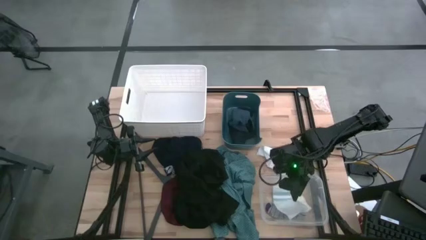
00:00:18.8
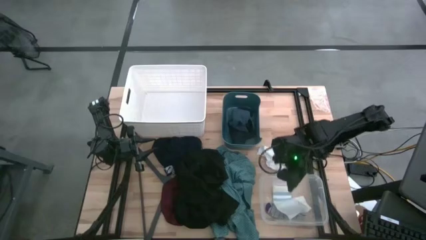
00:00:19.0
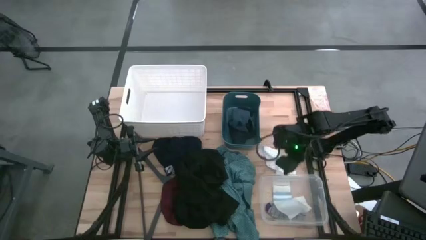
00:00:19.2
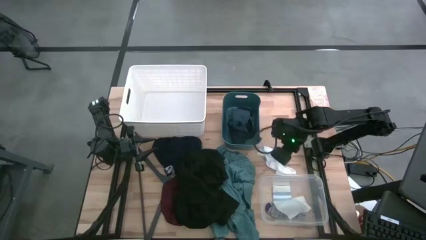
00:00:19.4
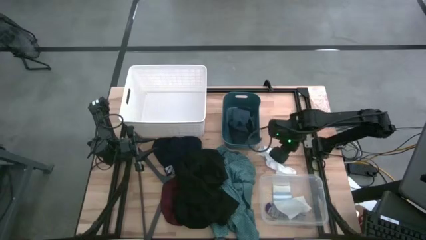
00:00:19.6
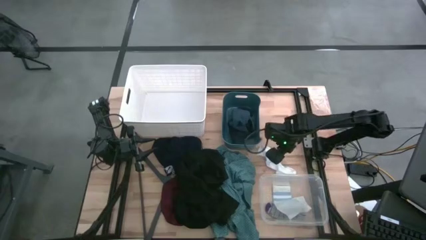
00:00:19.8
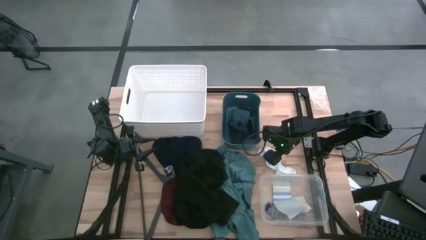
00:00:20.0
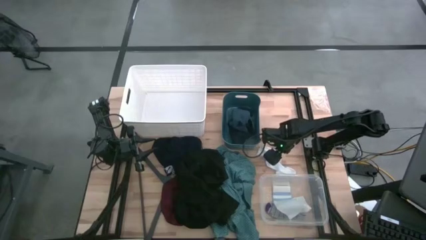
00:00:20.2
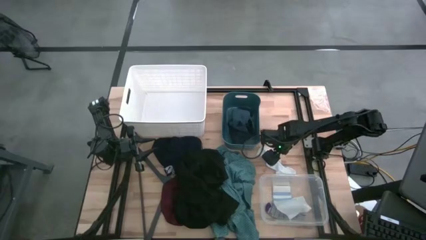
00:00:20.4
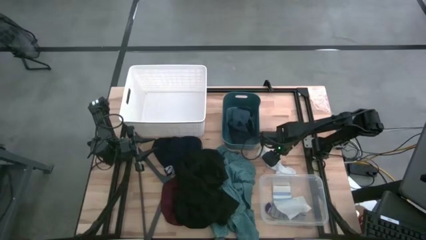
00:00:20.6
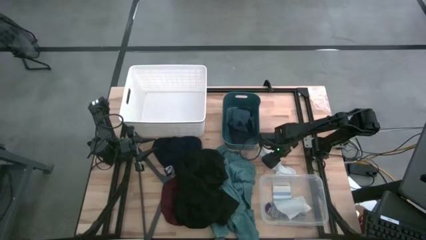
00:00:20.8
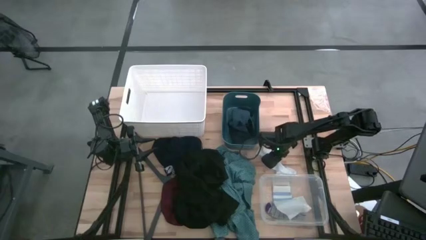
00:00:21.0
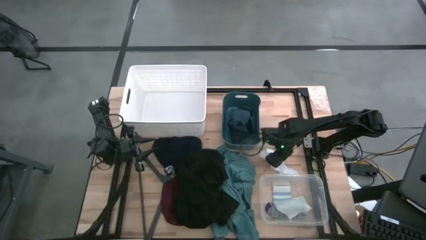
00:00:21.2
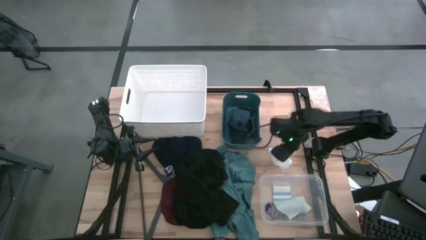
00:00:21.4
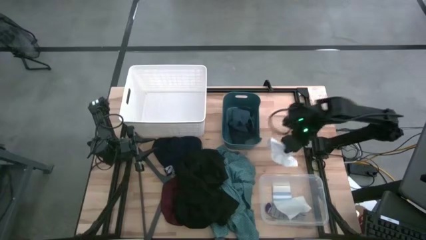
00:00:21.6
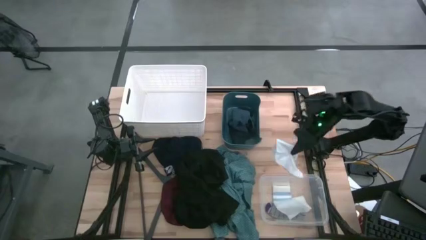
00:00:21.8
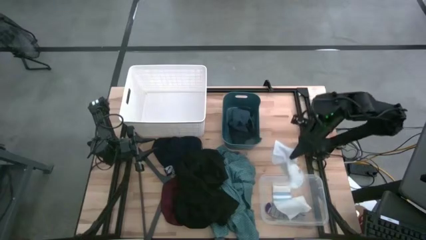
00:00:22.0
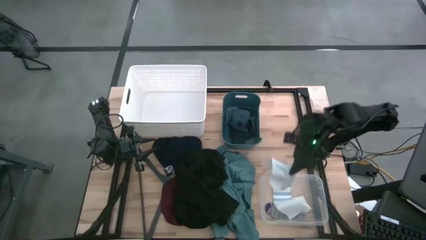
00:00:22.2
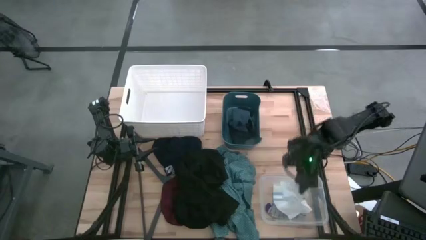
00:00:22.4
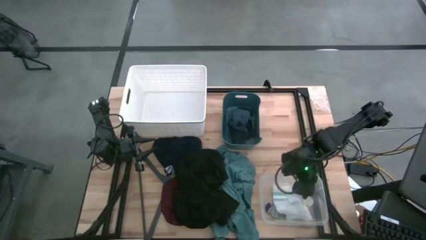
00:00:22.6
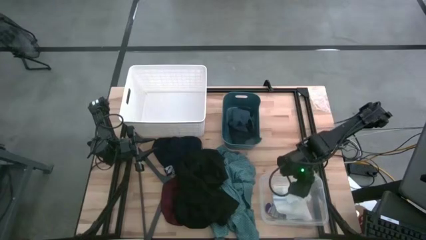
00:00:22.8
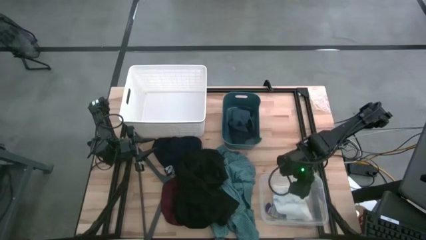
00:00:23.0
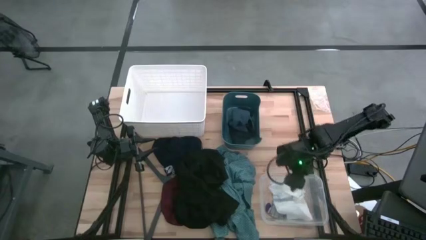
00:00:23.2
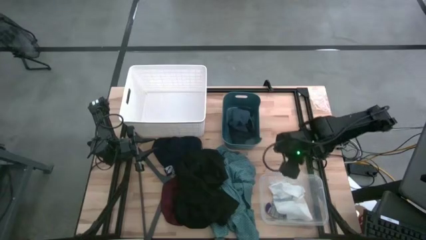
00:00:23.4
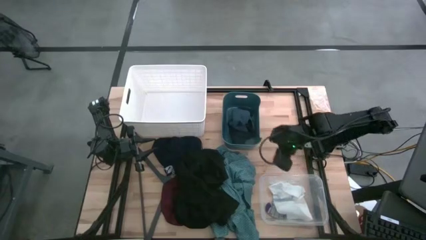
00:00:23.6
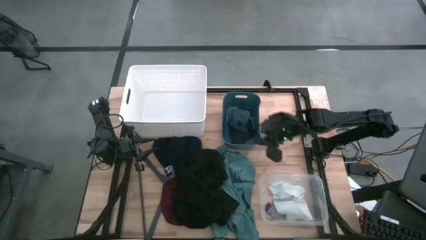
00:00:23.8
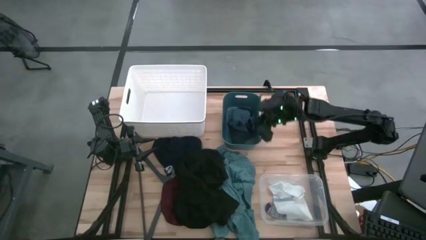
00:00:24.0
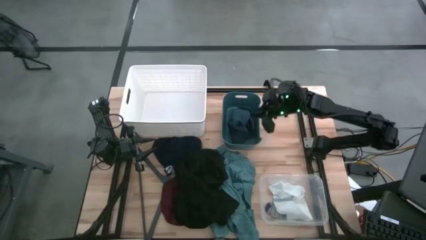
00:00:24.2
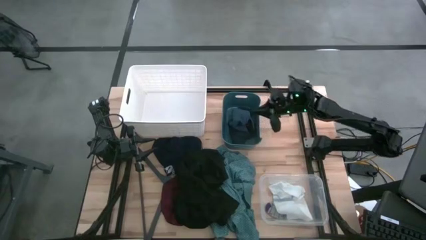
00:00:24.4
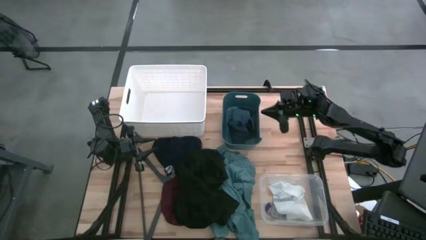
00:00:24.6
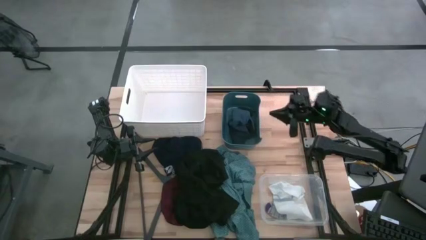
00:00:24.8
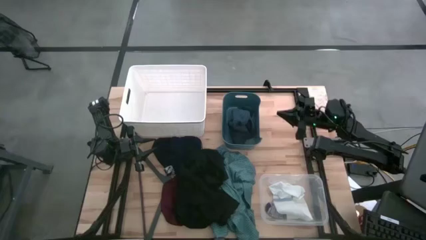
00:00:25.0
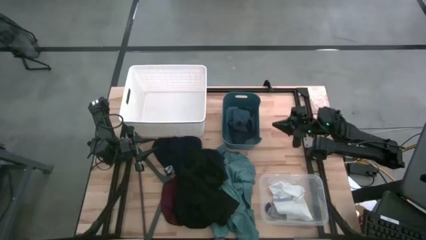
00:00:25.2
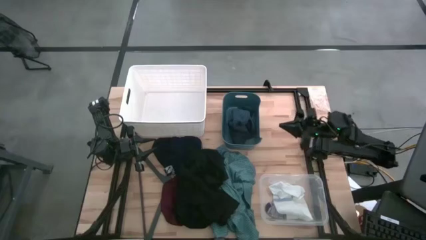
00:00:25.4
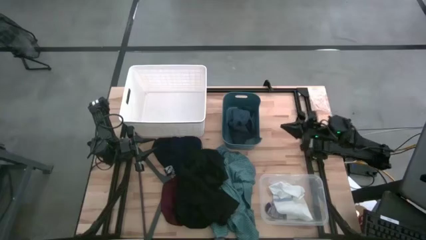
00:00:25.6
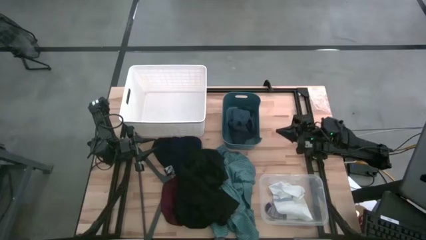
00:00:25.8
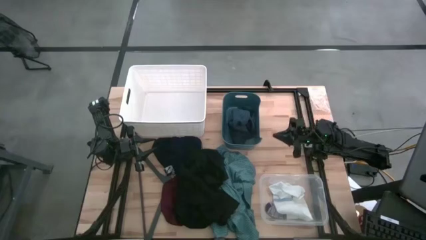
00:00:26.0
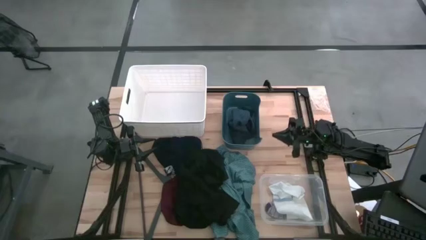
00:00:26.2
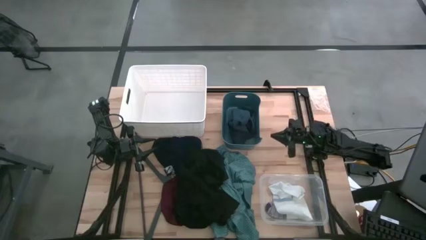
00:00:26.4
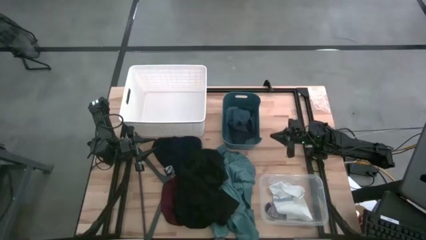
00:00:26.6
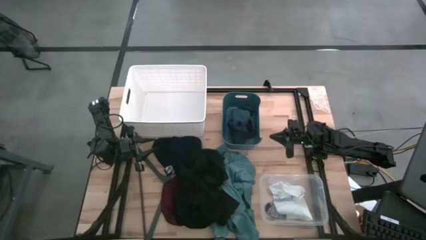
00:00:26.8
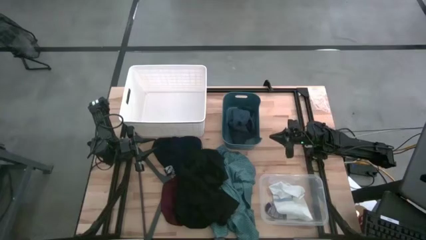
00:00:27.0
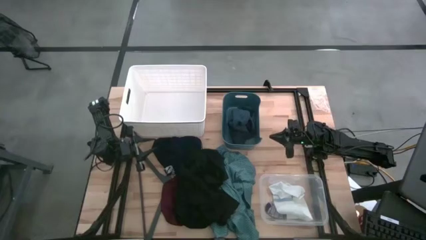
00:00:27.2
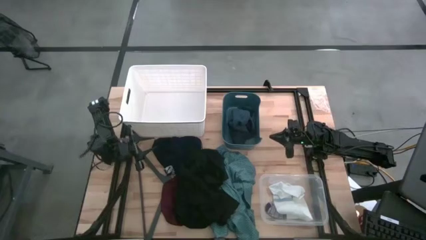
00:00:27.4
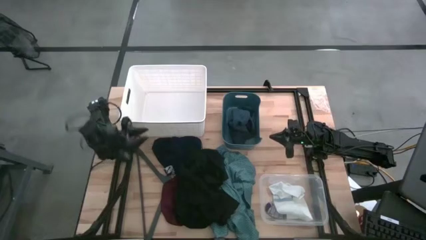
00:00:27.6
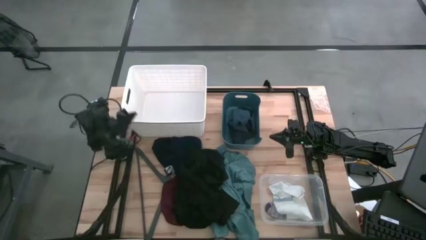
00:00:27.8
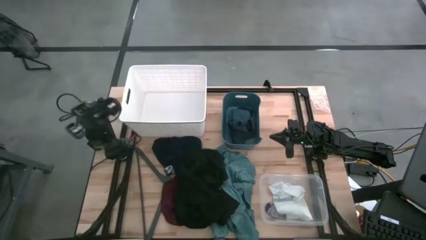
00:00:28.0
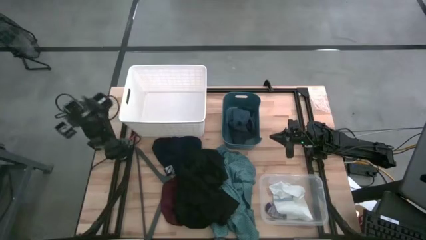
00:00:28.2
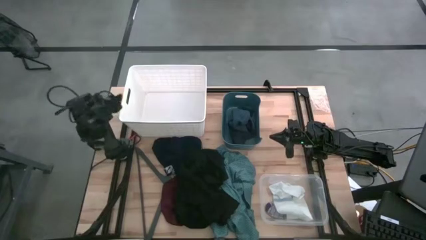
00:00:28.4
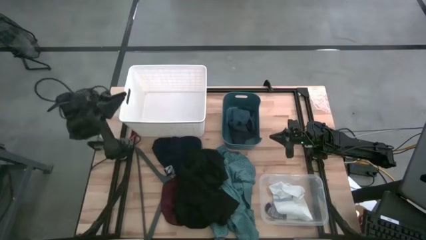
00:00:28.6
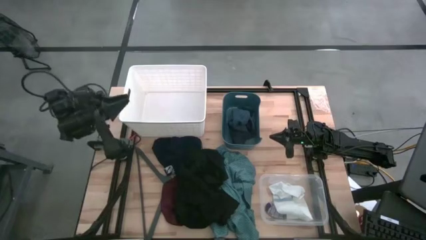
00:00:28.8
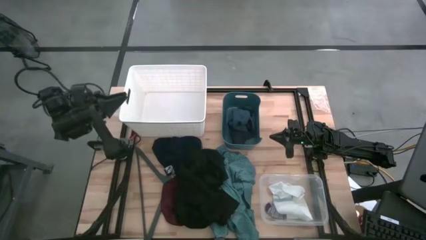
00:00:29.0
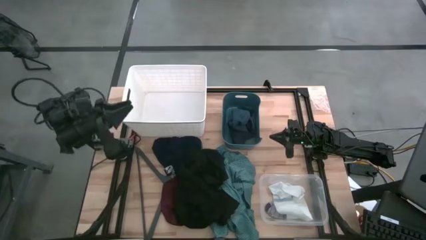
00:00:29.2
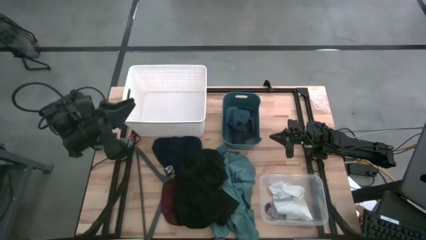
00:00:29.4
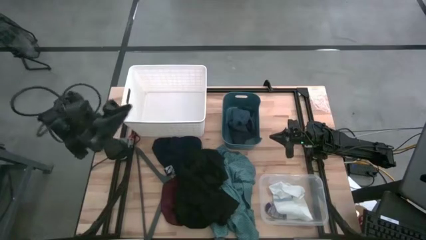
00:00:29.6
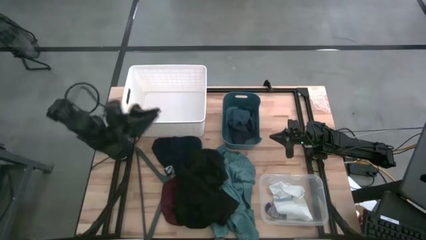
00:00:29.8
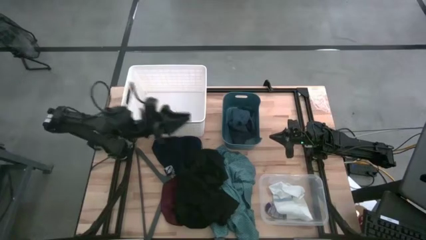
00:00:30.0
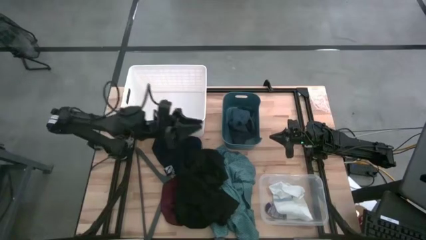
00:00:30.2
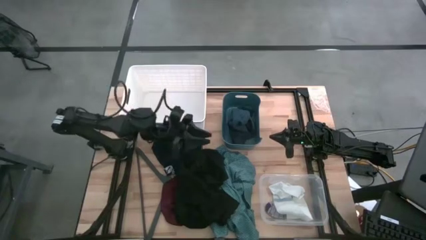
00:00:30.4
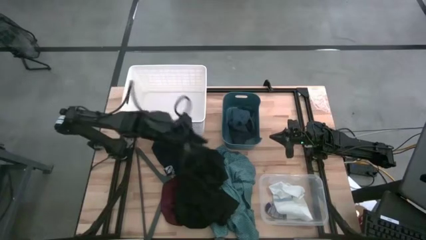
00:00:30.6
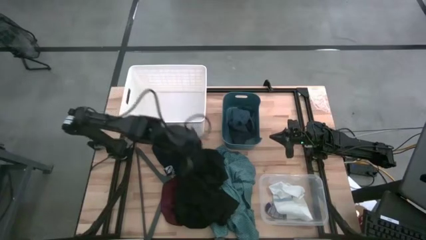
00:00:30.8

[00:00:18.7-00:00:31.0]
Task: Pick & Place Cloths
Put the black shirt into the white basket

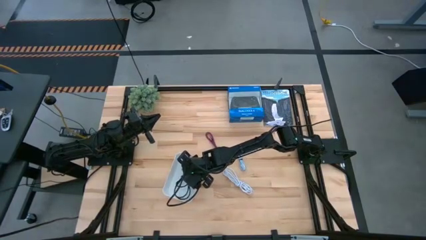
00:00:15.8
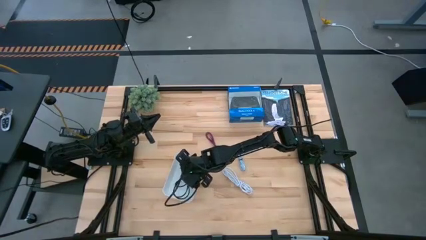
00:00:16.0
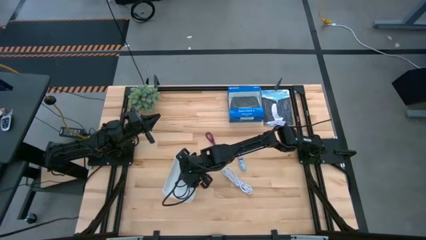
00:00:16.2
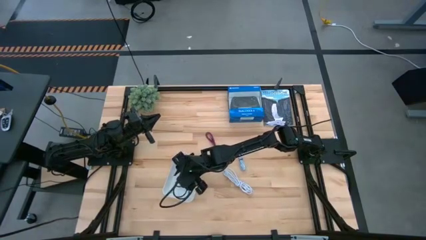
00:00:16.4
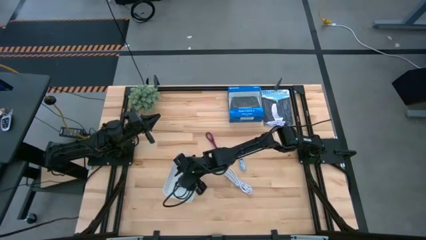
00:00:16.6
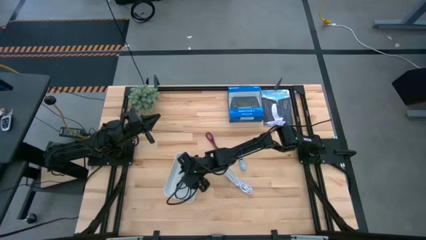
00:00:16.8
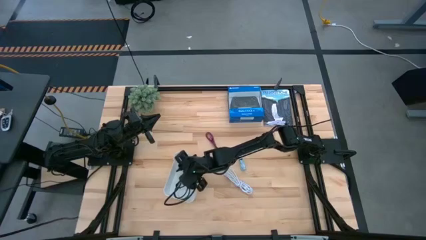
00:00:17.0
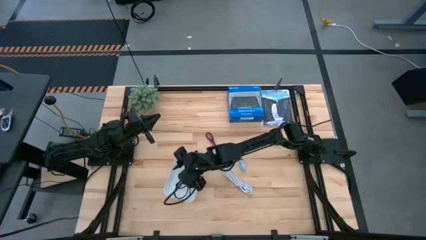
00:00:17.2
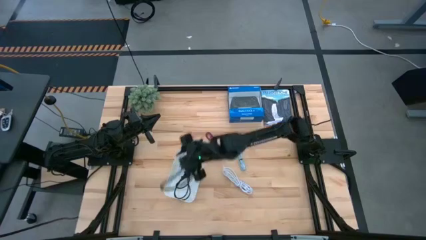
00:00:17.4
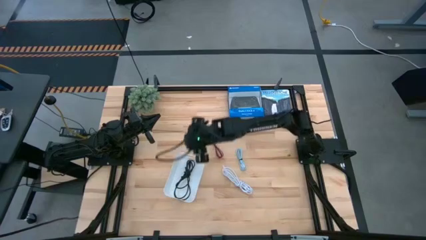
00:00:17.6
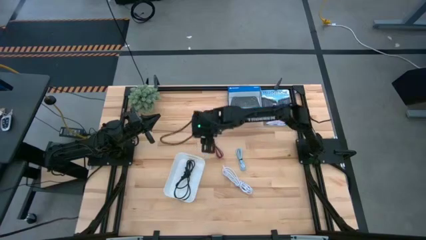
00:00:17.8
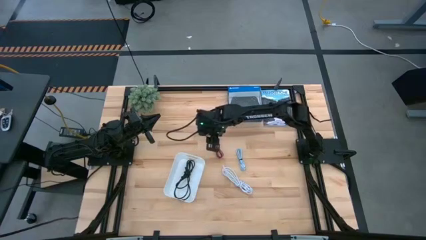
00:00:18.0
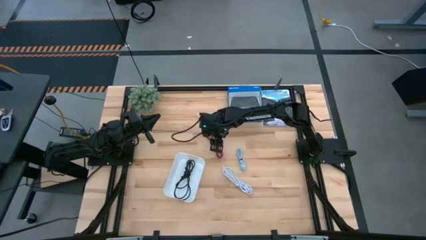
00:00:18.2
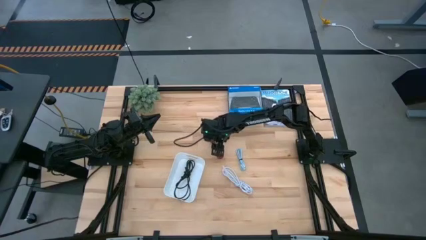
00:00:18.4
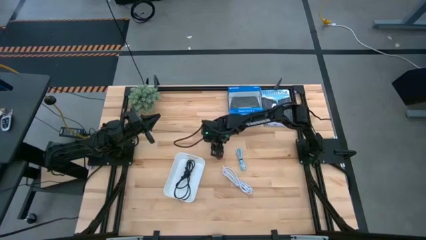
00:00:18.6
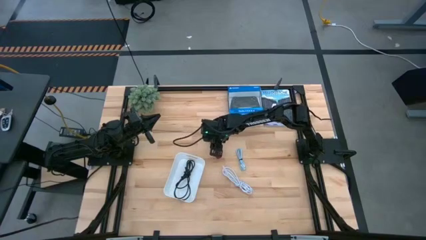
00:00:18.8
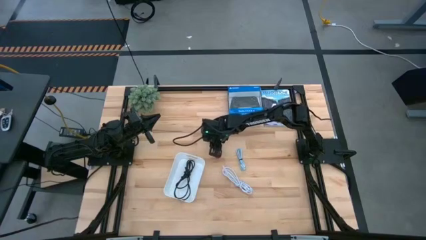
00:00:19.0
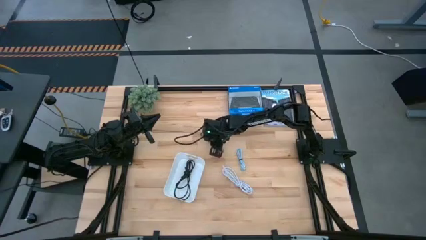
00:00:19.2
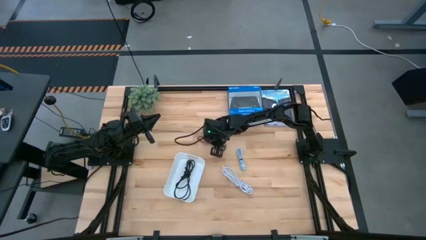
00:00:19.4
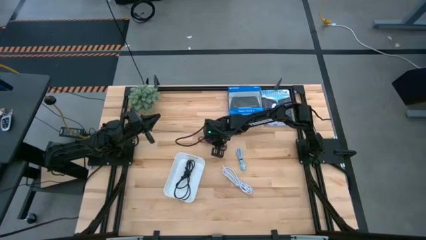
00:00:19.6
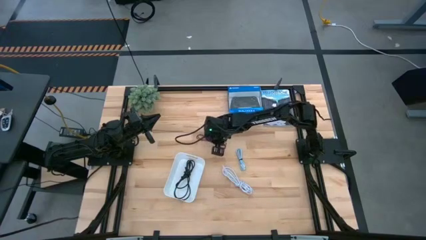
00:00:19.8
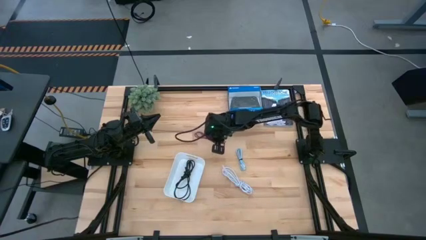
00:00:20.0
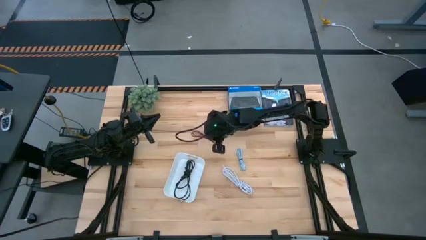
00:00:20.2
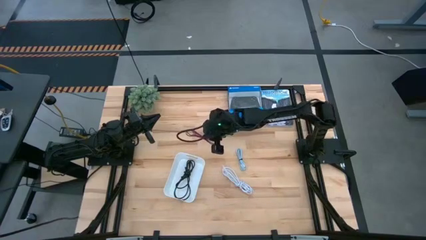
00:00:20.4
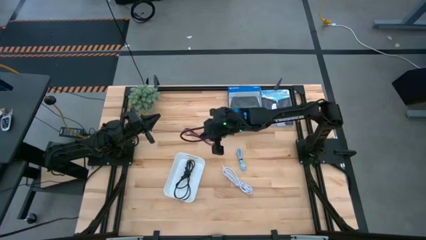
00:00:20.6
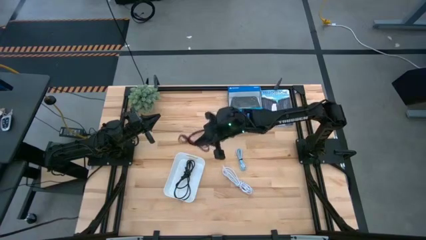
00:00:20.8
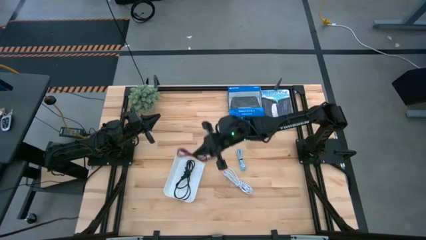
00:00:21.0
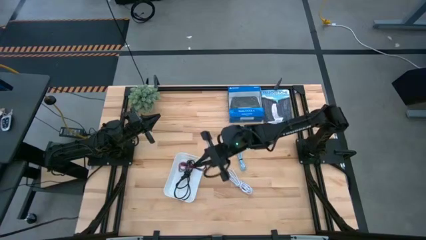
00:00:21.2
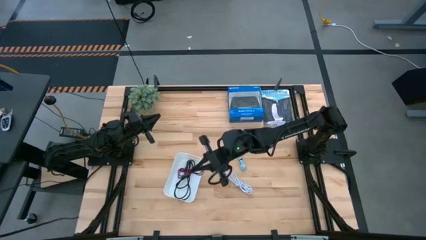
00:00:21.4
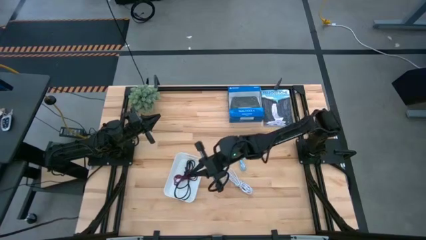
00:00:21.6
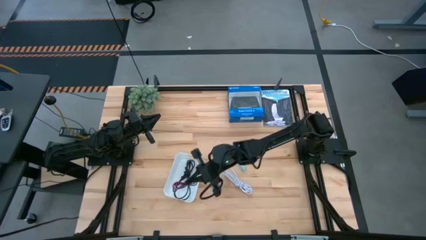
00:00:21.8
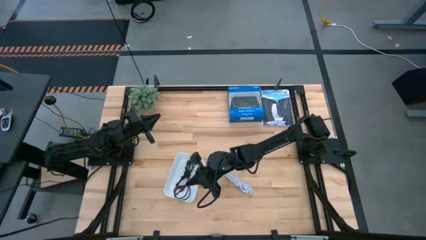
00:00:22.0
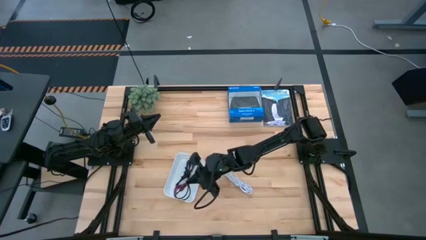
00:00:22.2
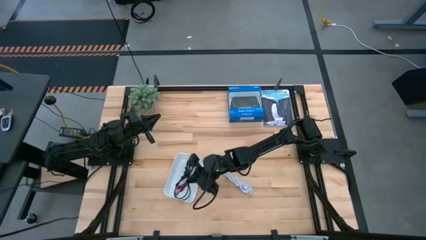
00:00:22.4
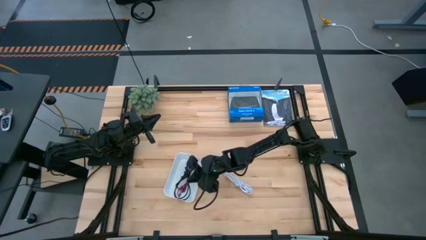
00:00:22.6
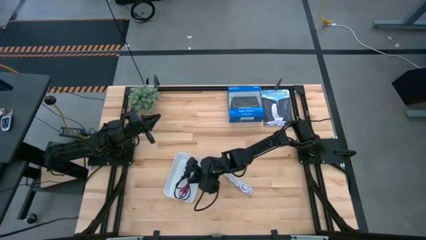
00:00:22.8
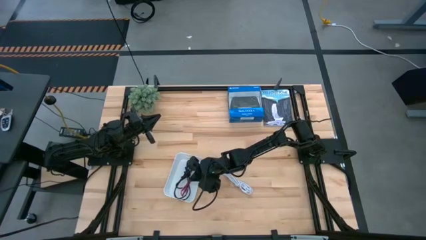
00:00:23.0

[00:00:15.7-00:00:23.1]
Task: Pick and place USB-C Cables
Put the pink charger cable into the white bin
